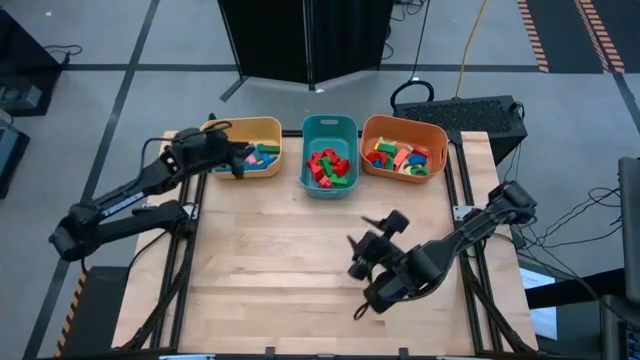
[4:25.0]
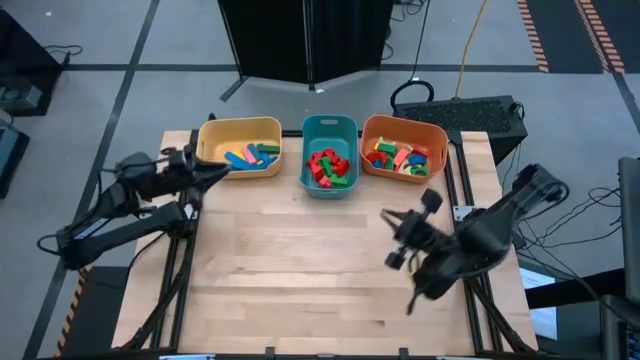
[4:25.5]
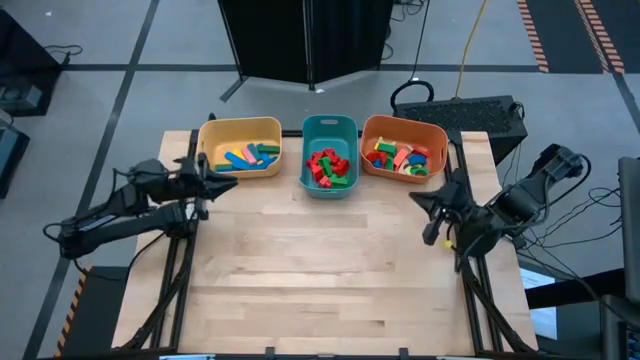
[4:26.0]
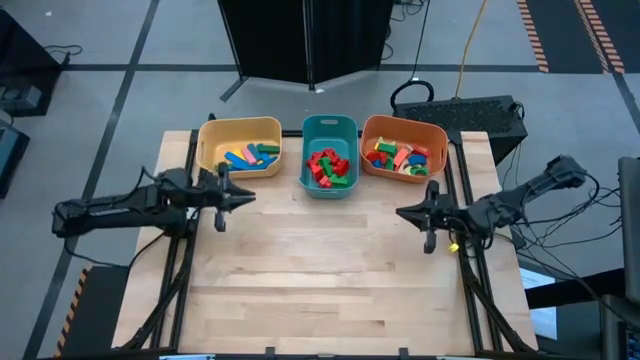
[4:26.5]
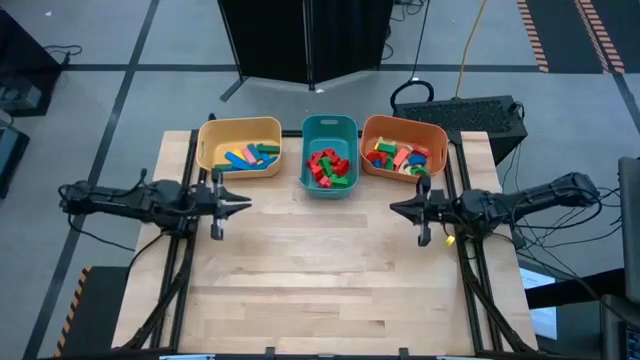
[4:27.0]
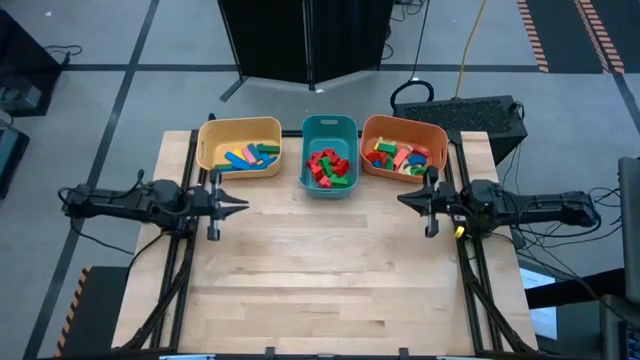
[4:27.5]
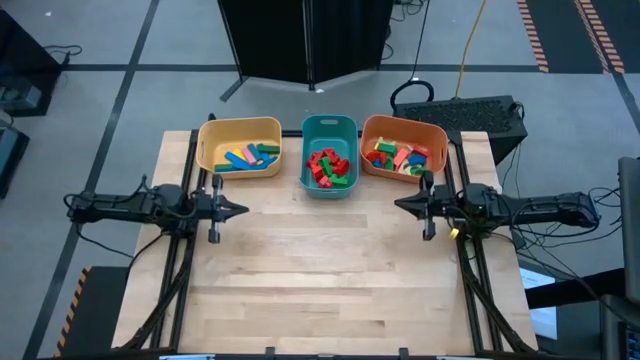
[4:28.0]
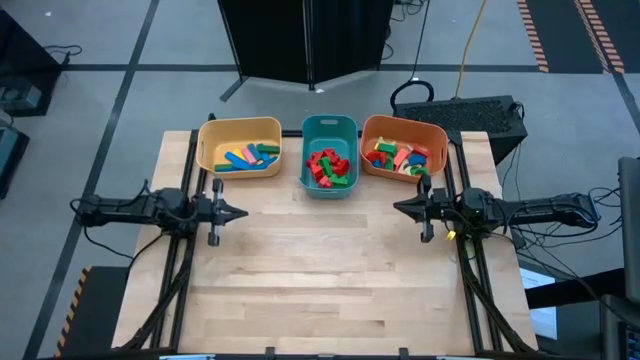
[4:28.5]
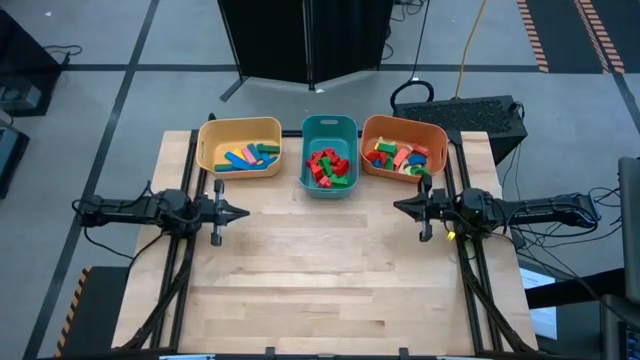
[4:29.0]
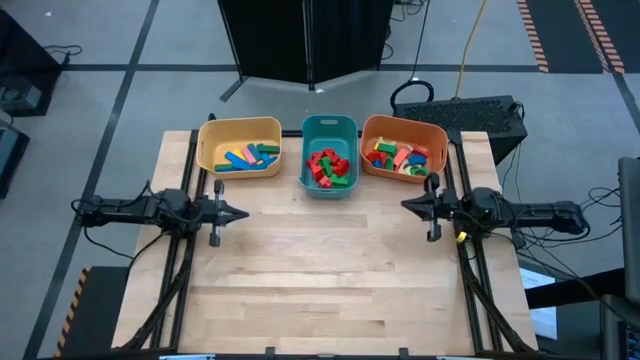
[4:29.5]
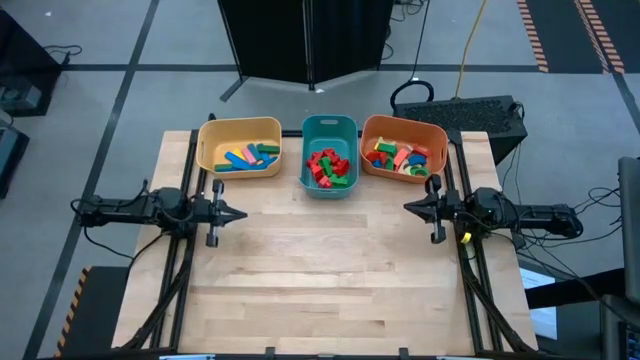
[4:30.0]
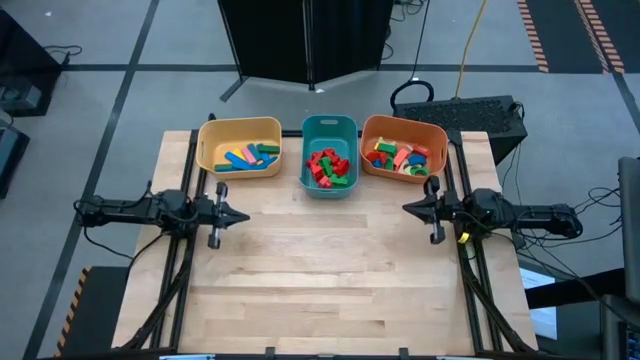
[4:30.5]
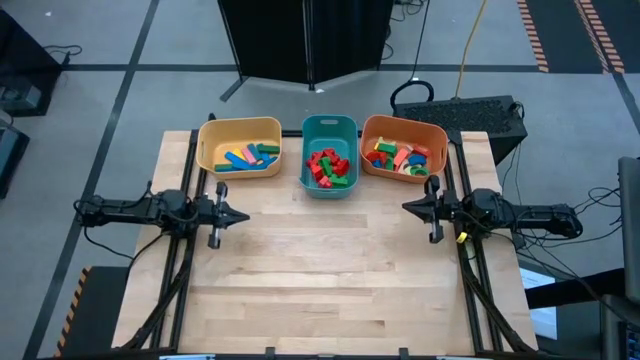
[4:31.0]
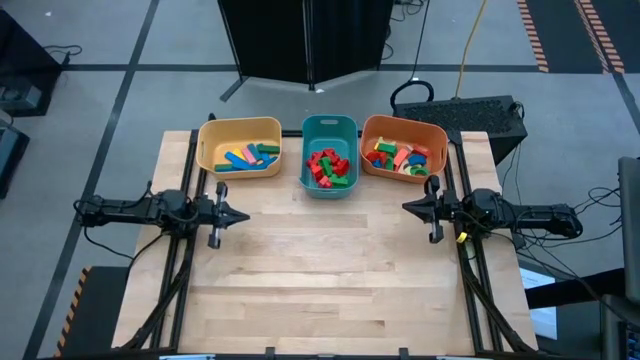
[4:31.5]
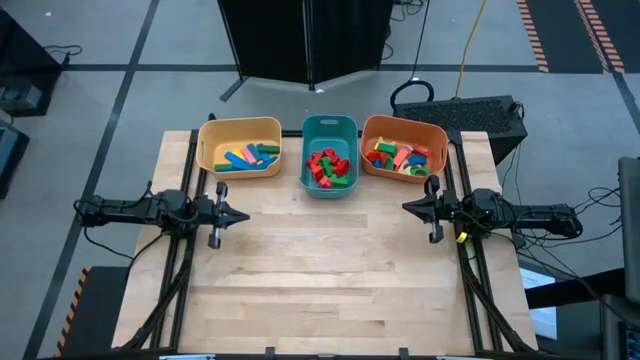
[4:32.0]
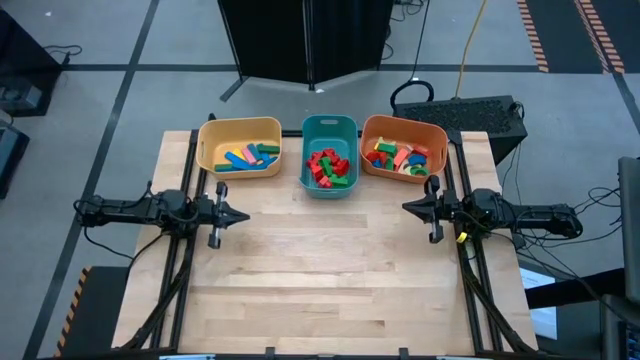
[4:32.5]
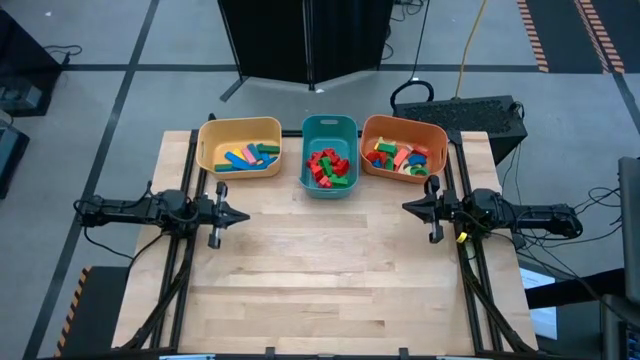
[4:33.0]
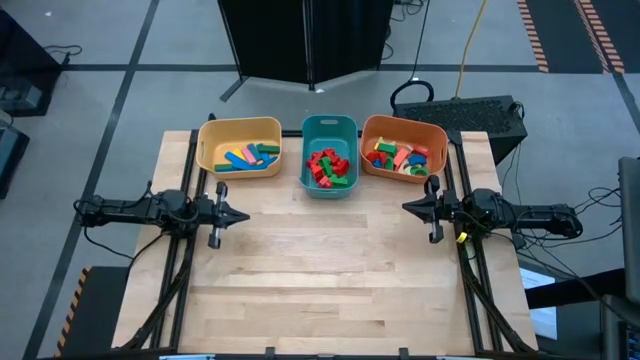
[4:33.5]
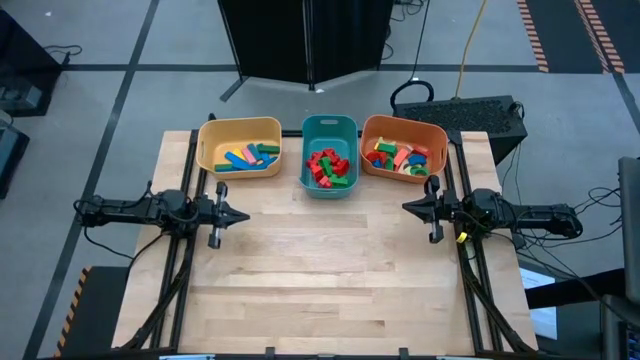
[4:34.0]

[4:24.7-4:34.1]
Task: Sort blocks by size
Return to Home Position

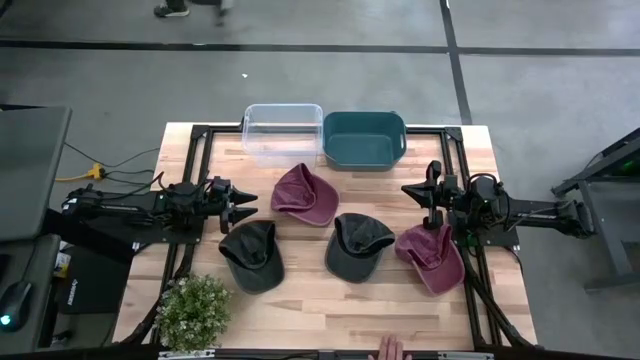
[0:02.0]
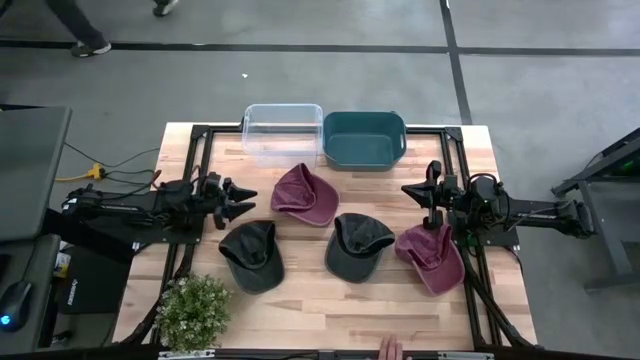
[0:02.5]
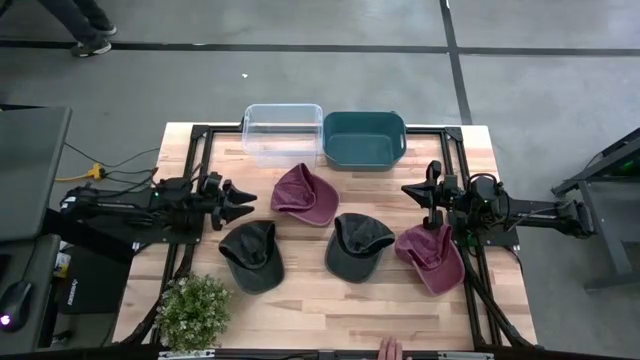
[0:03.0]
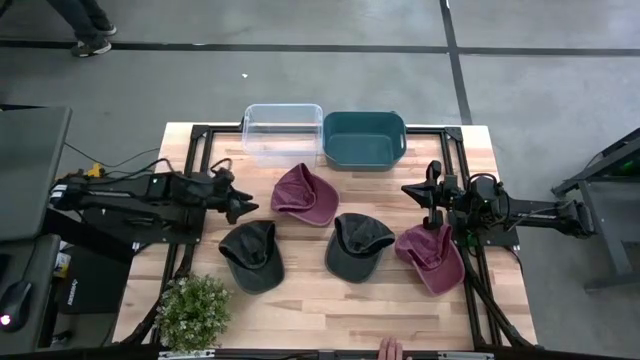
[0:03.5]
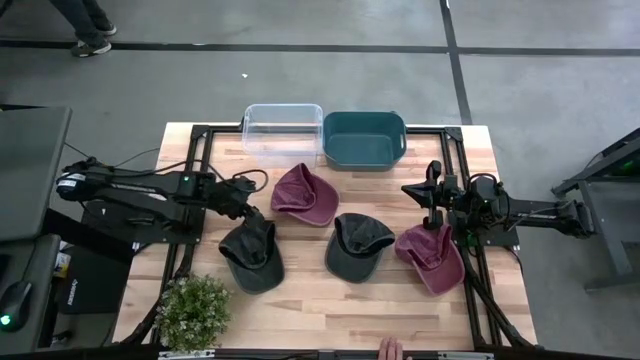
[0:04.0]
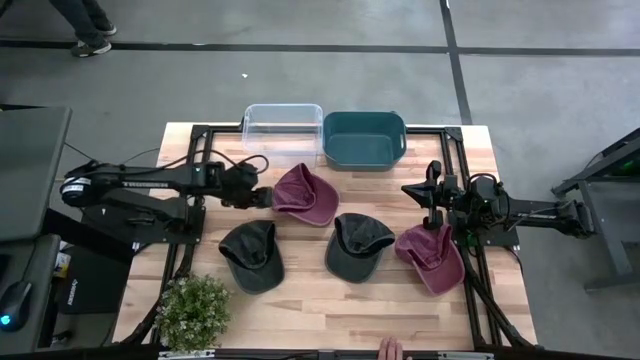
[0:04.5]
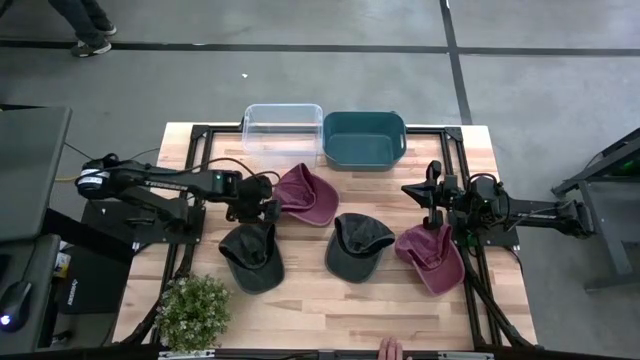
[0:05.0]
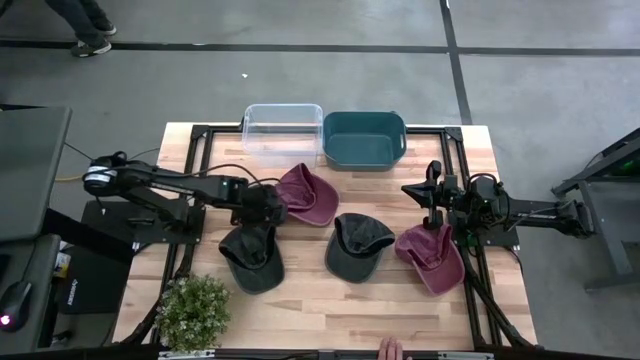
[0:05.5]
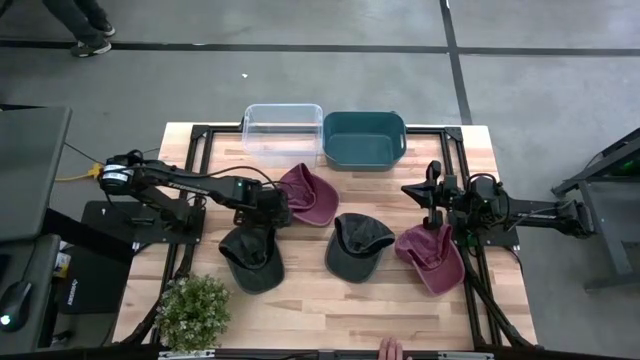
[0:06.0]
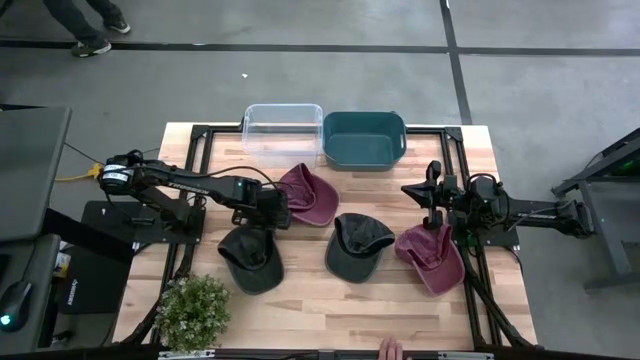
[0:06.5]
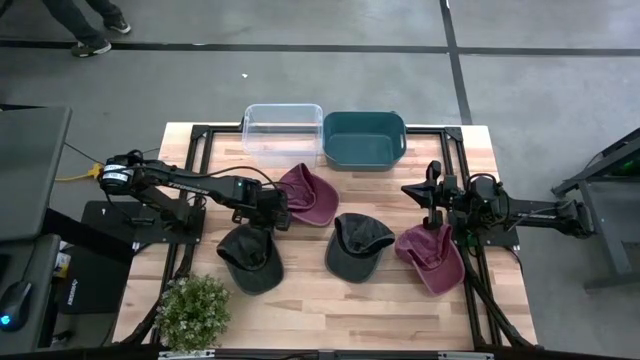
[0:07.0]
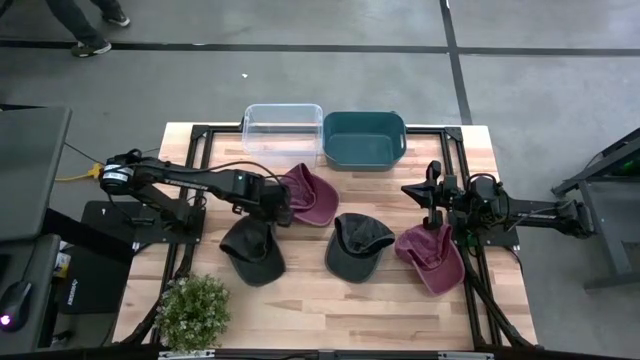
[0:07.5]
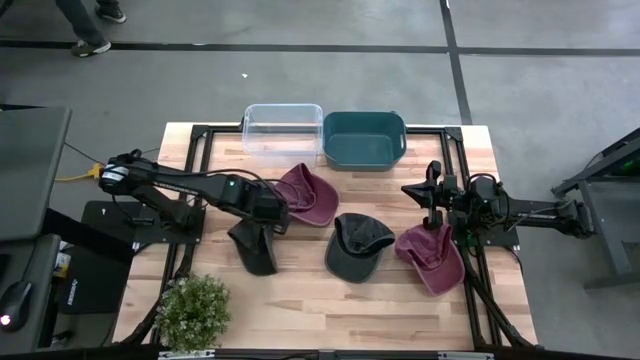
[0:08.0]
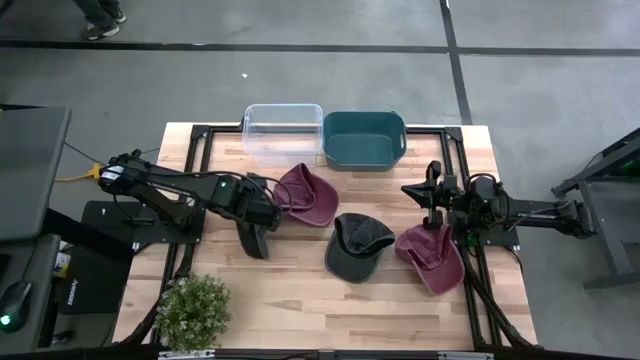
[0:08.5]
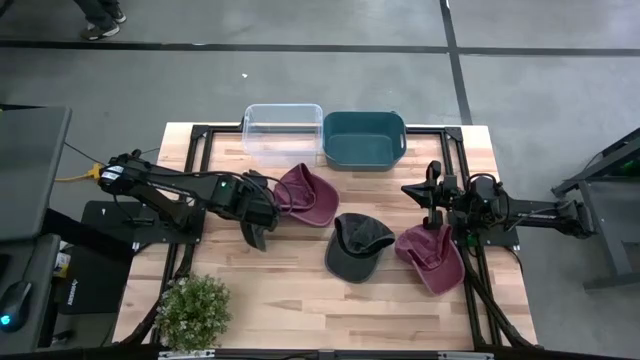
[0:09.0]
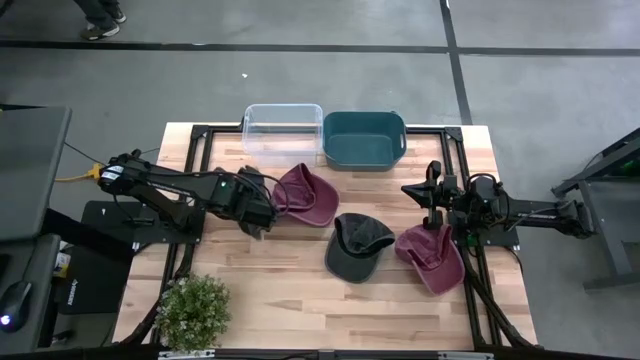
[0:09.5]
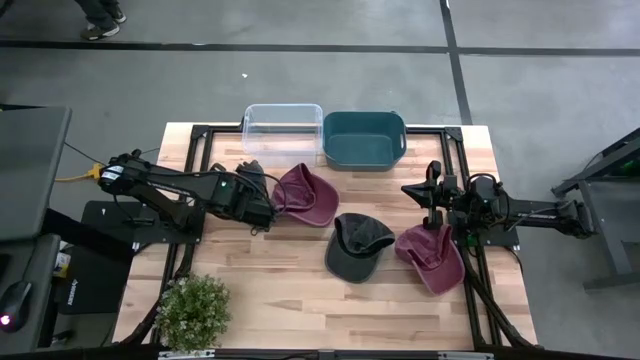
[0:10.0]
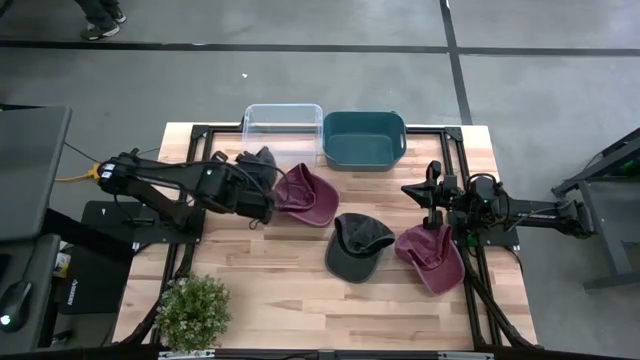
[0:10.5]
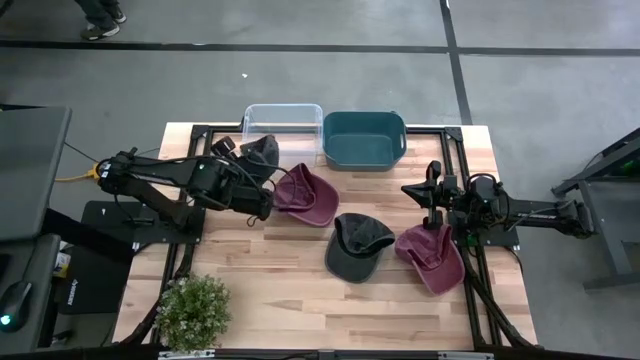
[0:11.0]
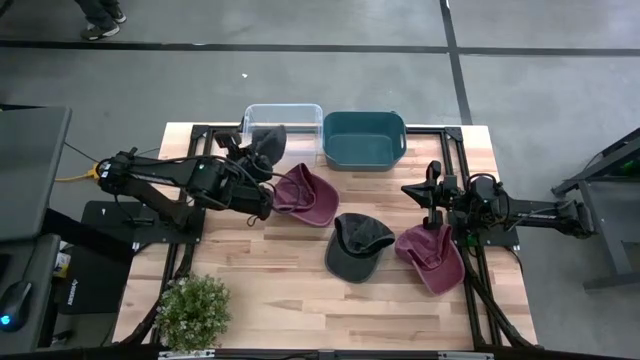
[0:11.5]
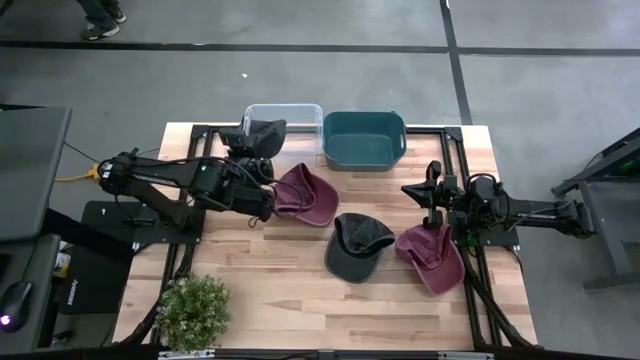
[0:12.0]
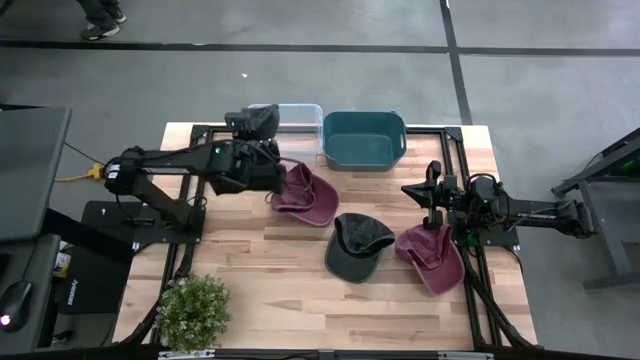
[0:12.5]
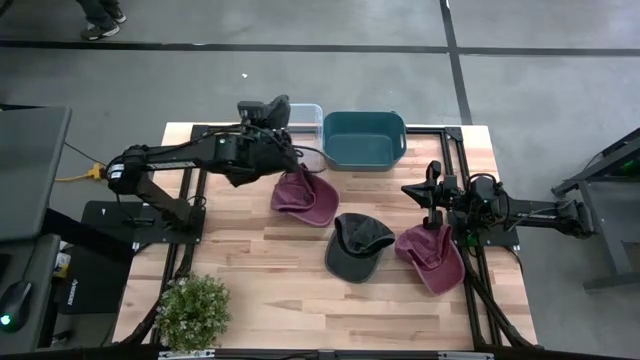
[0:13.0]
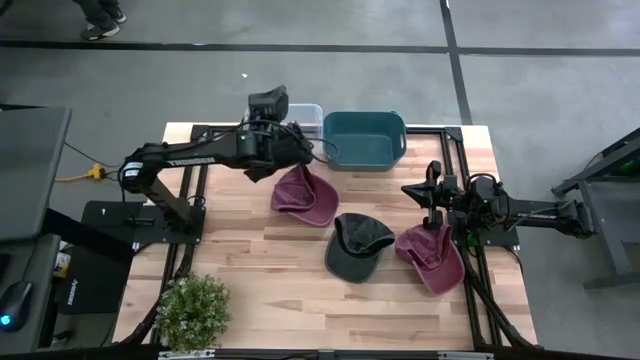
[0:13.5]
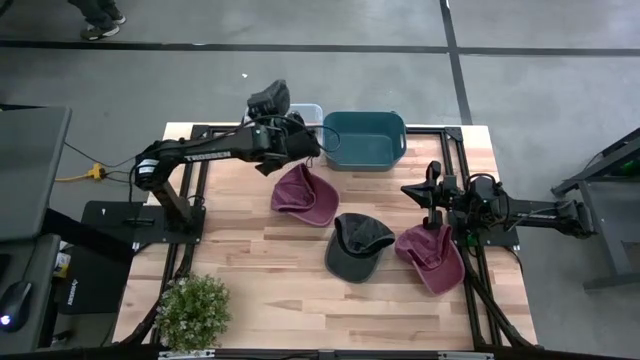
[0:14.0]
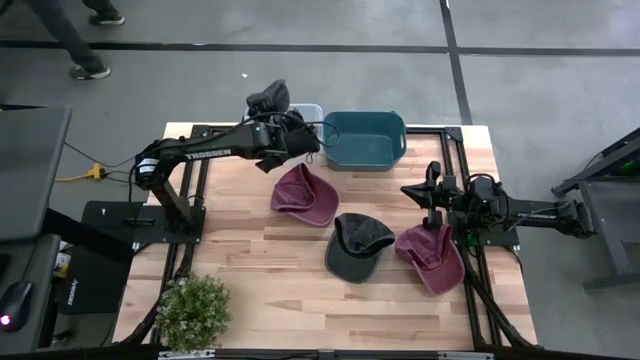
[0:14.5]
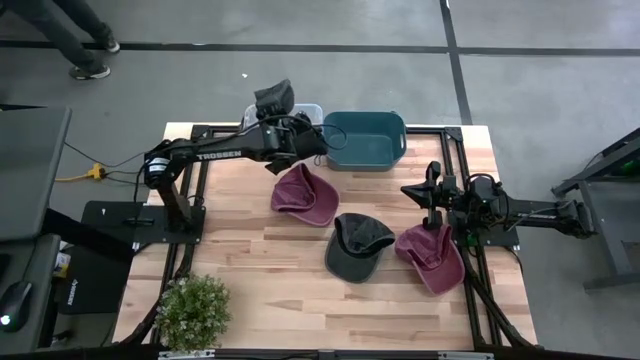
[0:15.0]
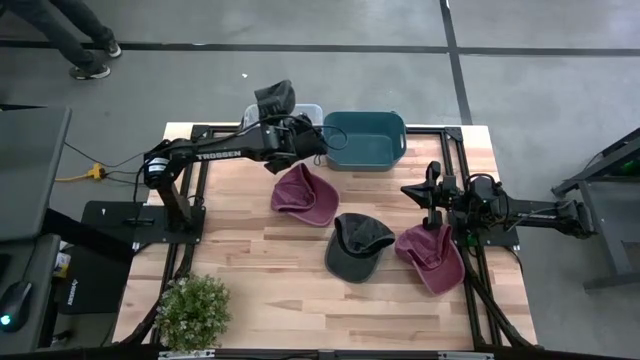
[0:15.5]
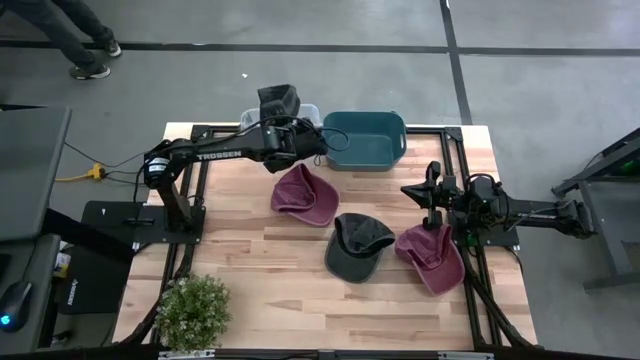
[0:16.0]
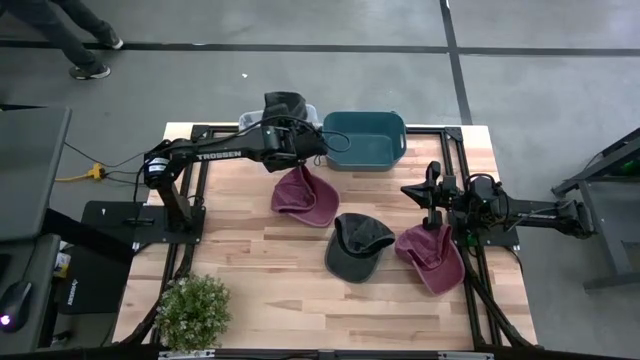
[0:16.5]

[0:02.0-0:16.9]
Task: Pick & Place hat
Put the left black cap into the transparent bin
